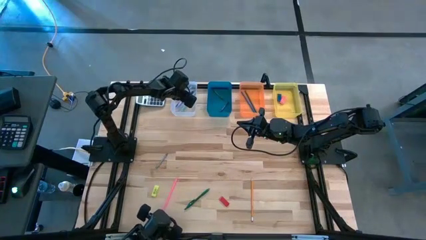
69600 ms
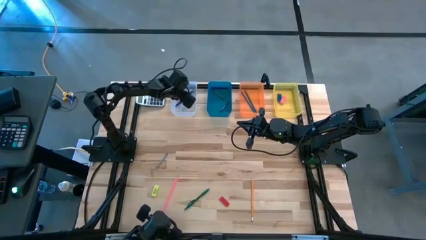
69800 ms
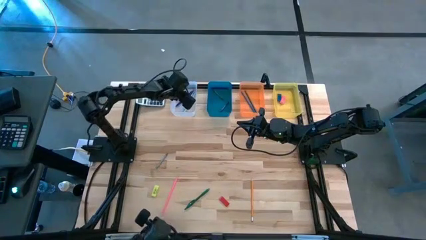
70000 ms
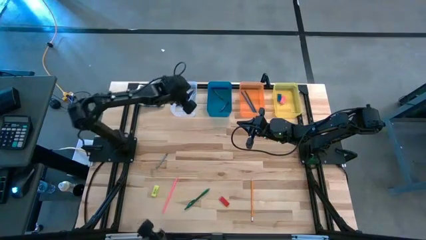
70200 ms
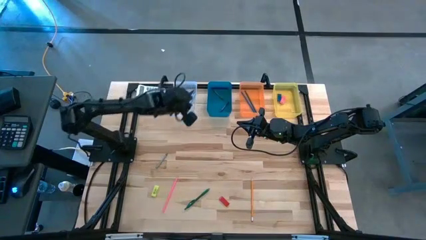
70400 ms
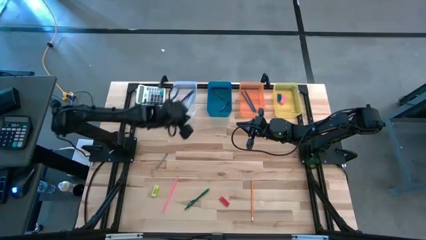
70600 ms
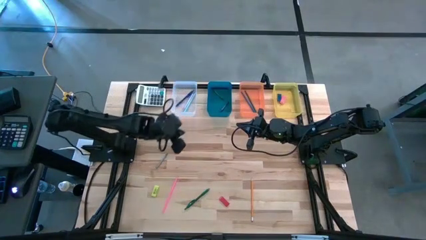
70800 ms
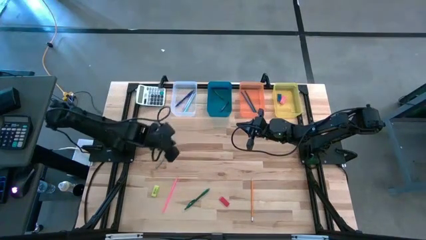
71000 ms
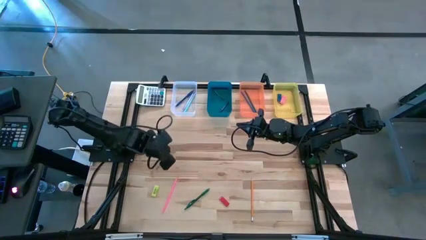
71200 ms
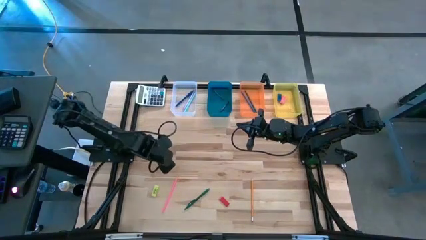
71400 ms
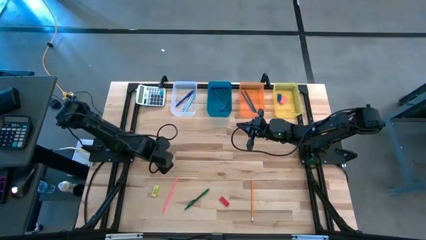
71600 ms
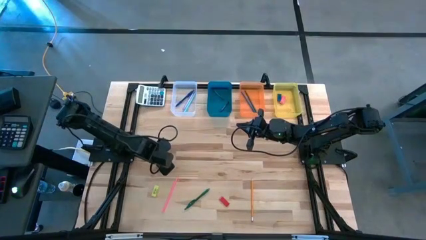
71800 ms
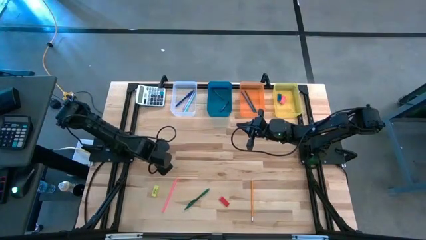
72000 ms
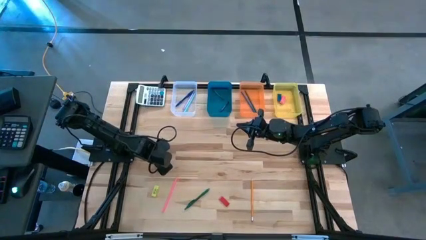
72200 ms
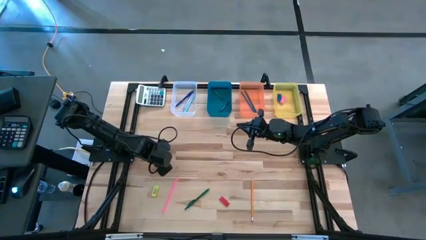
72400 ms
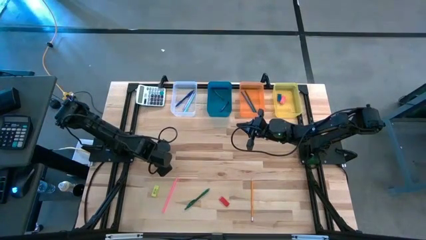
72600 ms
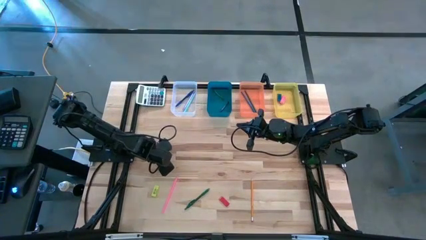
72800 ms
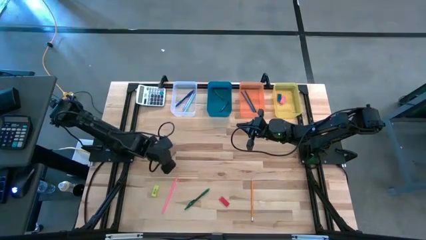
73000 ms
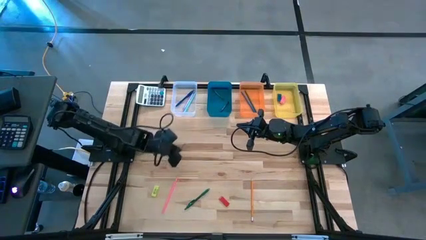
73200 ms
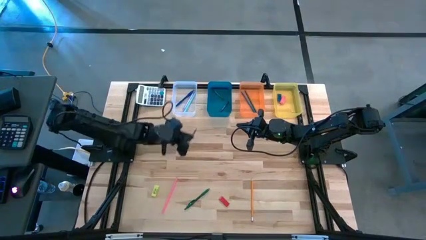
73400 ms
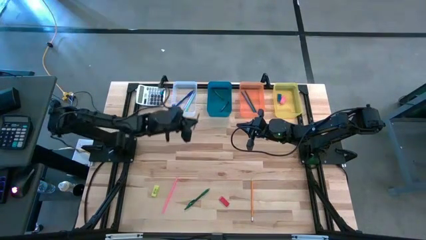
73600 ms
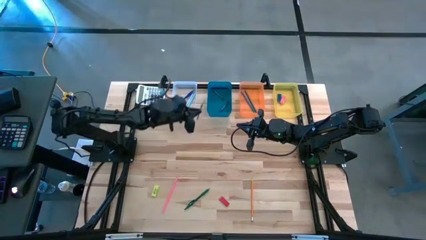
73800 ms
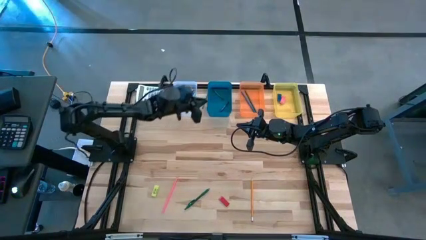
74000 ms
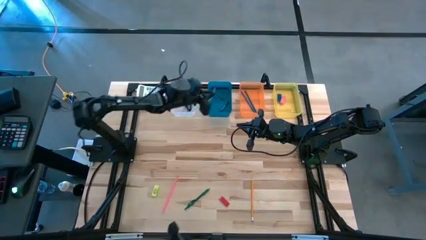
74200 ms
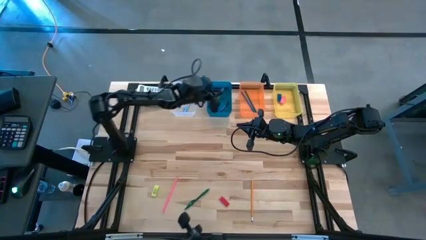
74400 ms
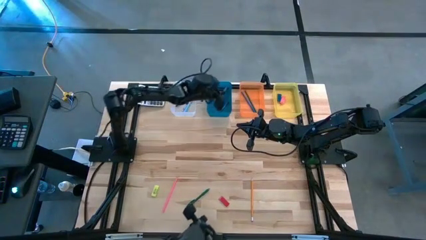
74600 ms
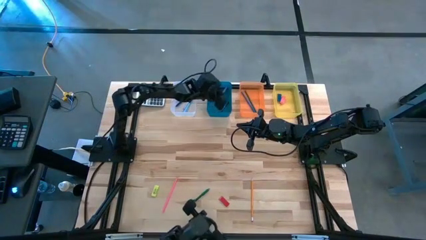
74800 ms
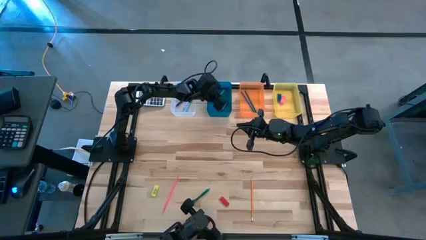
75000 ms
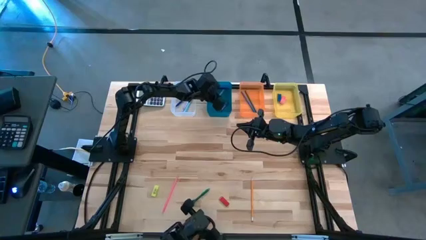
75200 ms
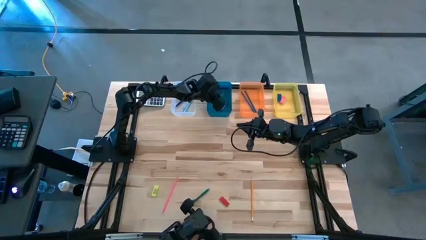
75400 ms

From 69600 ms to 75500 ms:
Task: Sort crayons/erasers/pens/pencils in bins
Put the gray crayon into the blue bin

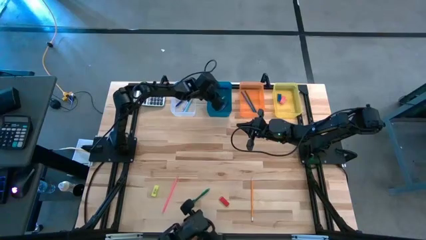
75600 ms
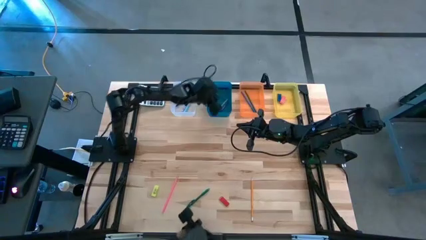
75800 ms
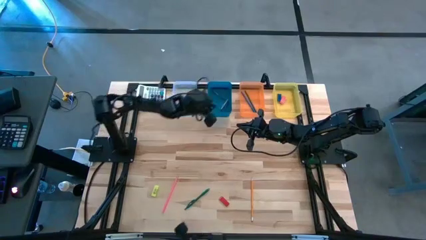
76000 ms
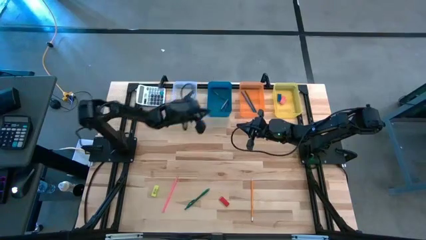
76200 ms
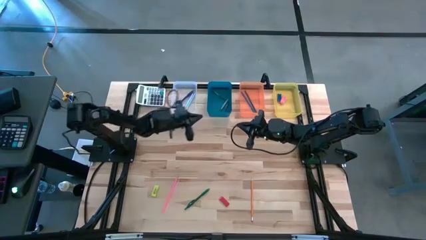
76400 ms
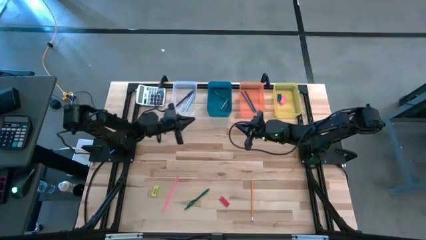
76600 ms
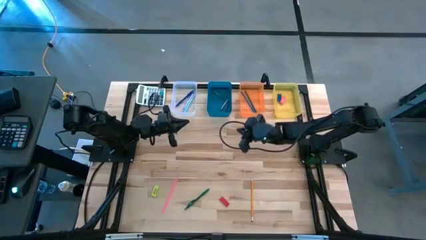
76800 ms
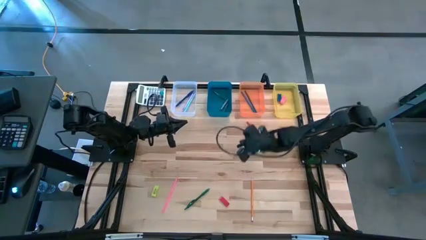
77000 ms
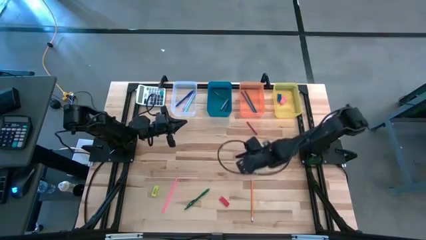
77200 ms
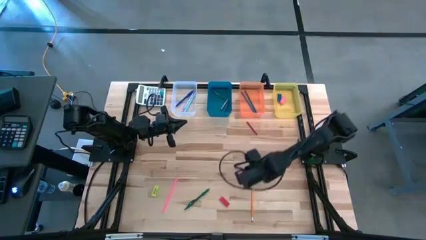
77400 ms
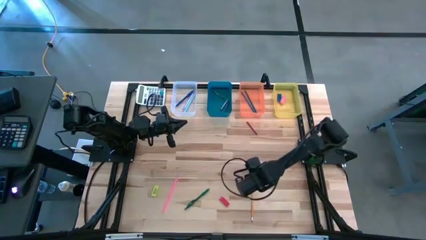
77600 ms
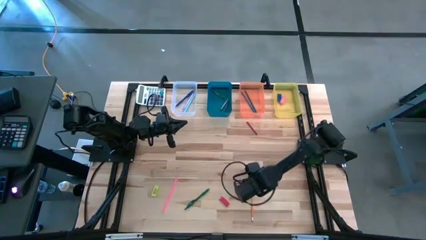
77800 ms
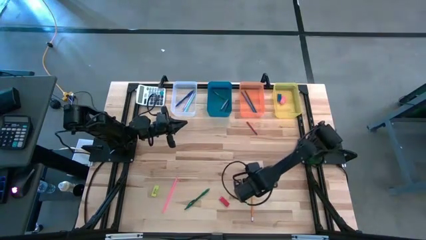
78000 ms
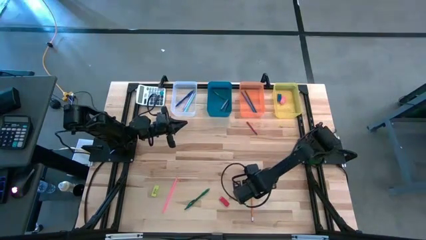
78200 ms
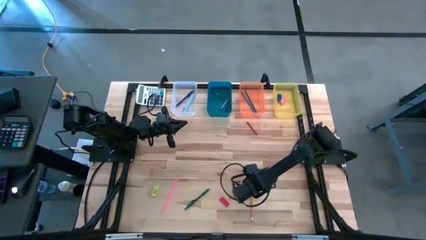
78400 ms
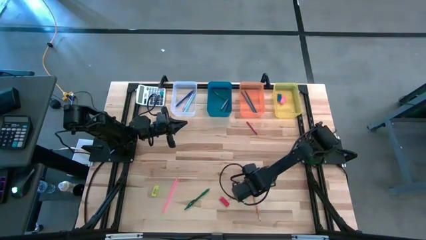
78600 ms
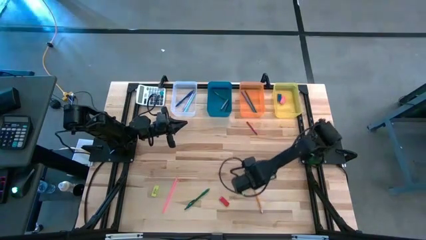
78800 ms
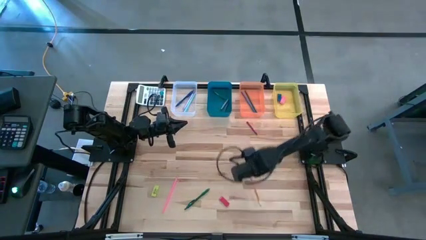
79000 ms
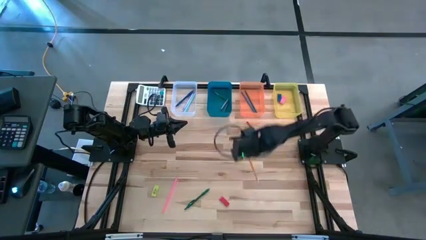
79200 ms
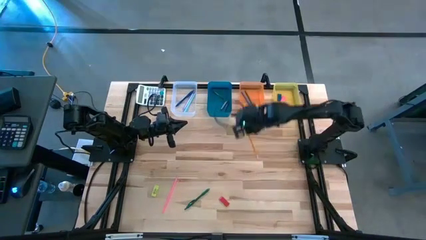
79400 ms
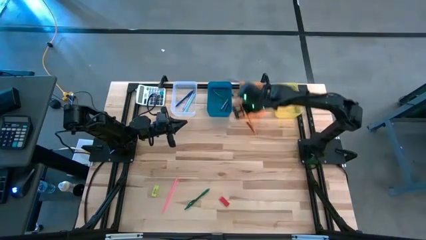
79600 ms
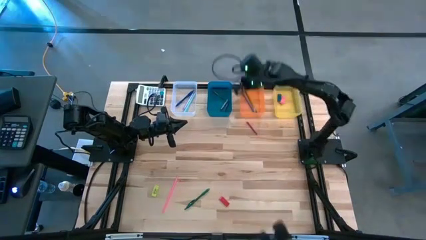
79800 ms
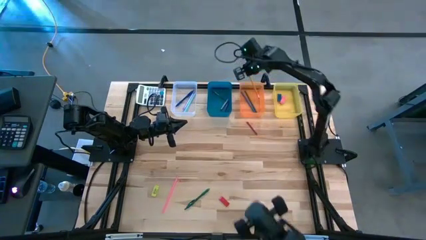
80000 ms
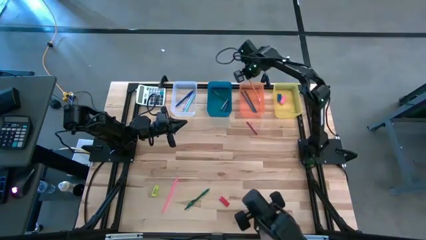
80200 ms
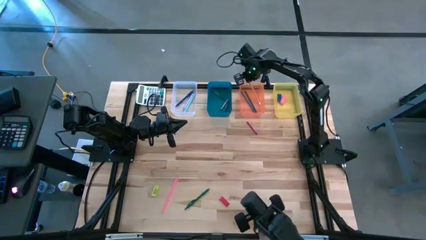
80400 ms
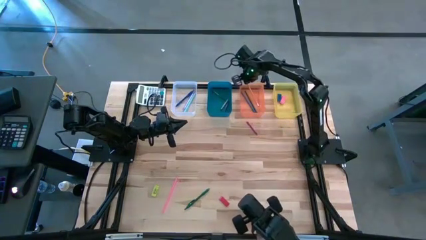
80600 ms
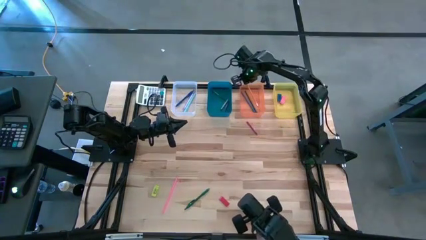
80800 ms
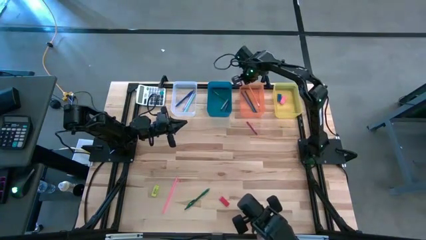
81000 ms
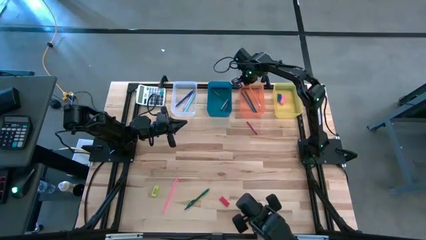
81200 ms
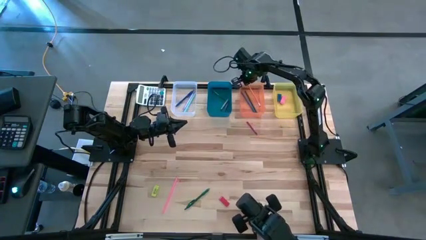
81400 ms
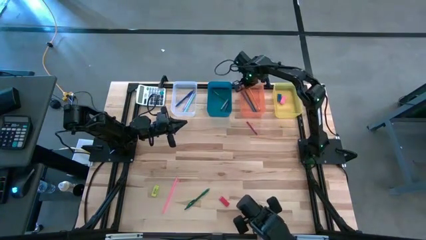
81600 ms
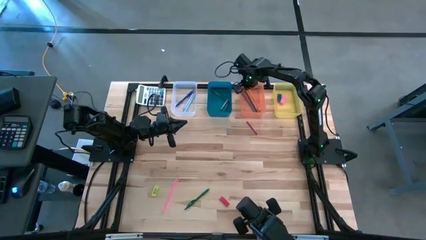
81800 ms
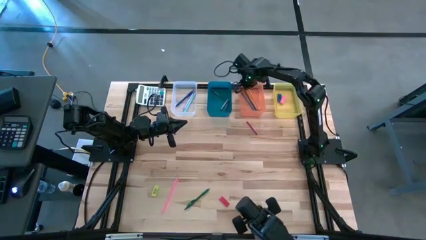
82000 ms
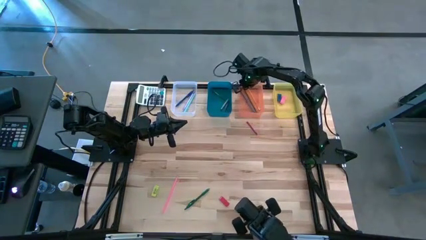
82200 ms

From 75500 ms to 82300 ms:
Put the orange pencil into the orange bin

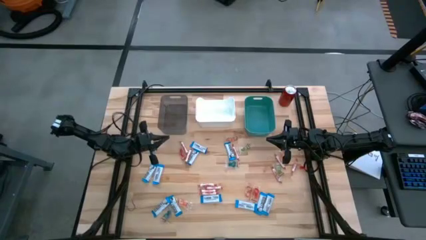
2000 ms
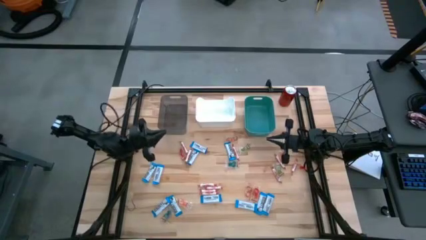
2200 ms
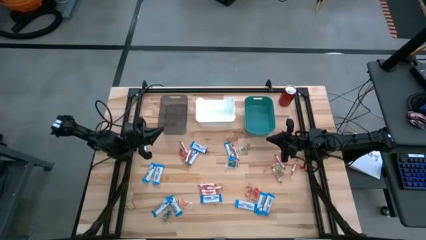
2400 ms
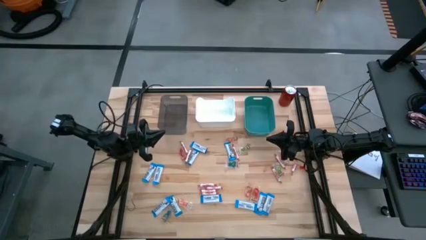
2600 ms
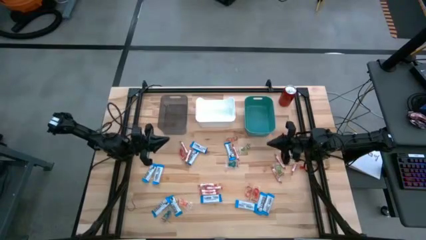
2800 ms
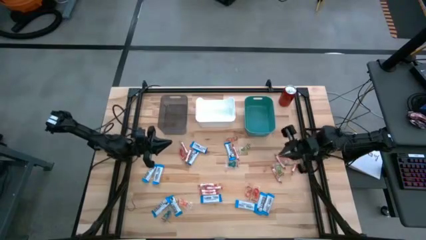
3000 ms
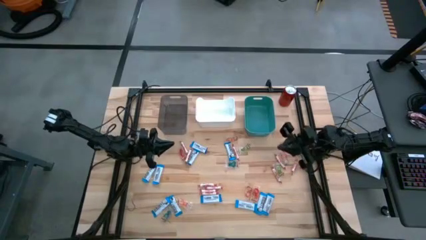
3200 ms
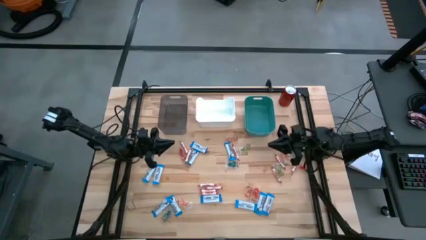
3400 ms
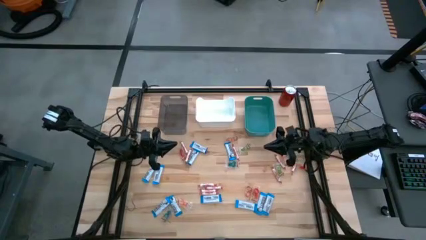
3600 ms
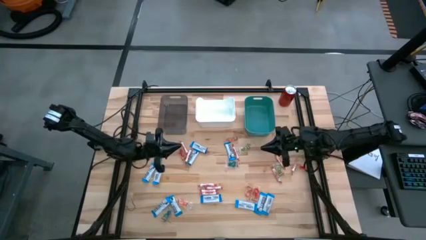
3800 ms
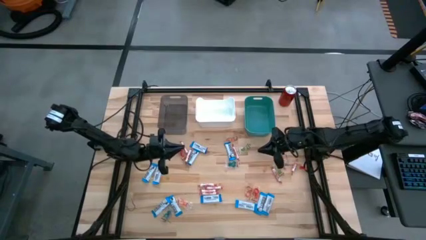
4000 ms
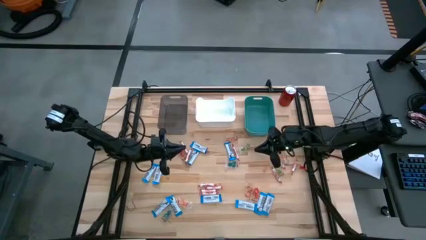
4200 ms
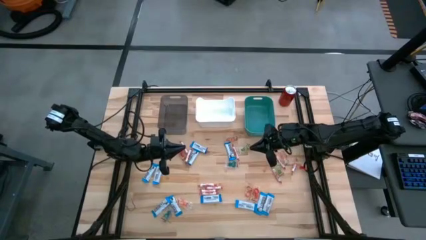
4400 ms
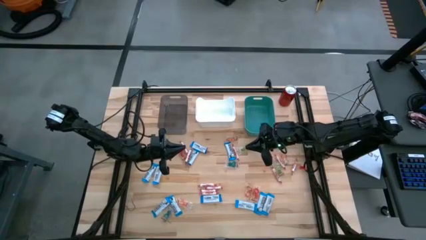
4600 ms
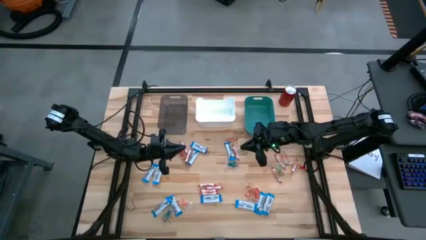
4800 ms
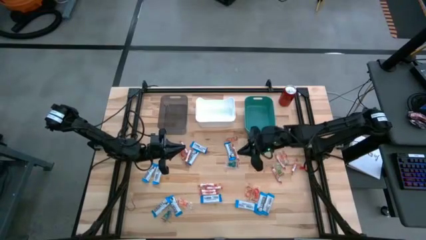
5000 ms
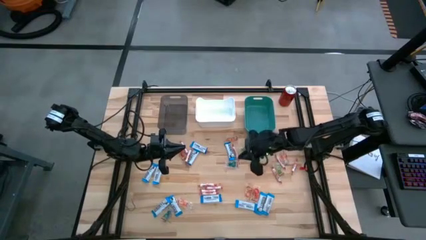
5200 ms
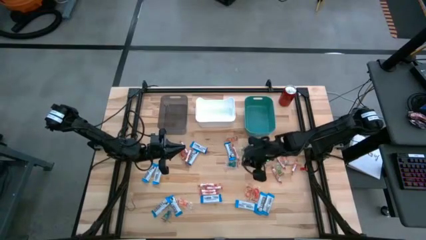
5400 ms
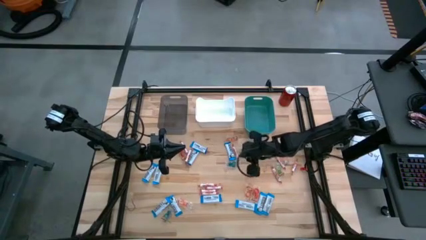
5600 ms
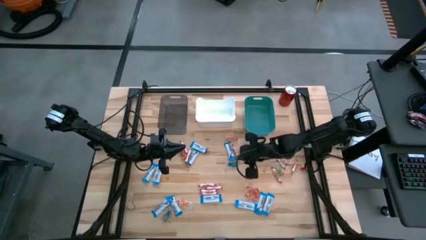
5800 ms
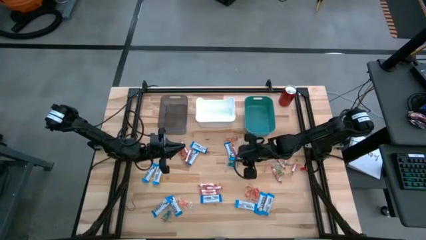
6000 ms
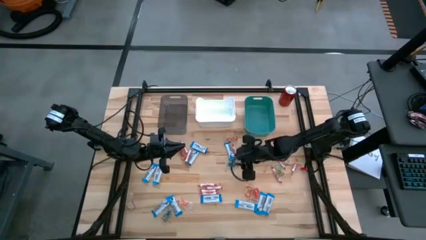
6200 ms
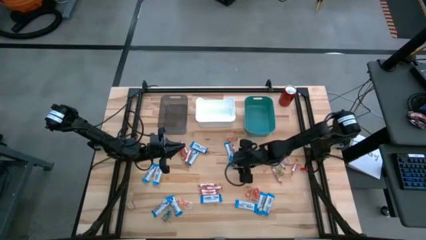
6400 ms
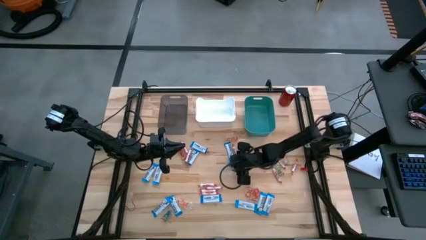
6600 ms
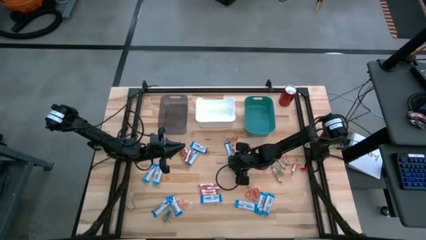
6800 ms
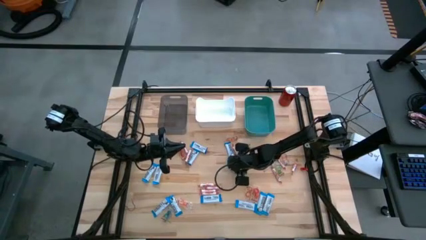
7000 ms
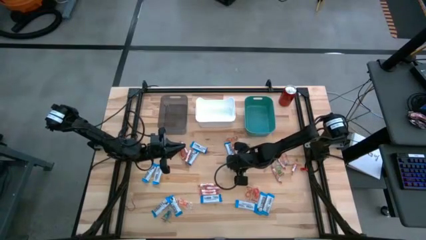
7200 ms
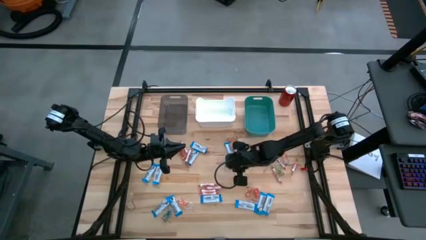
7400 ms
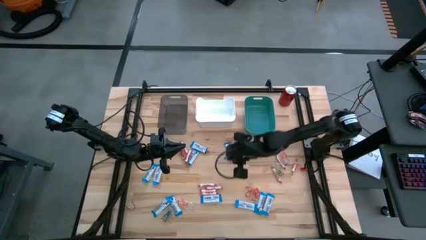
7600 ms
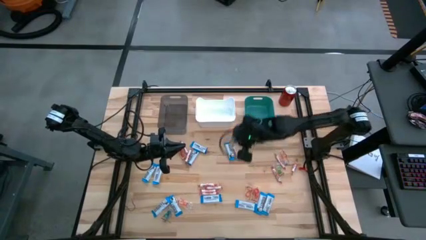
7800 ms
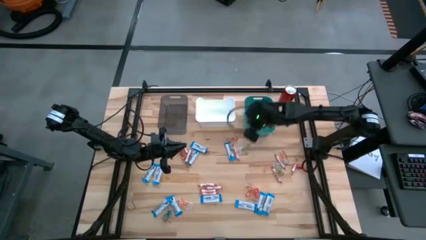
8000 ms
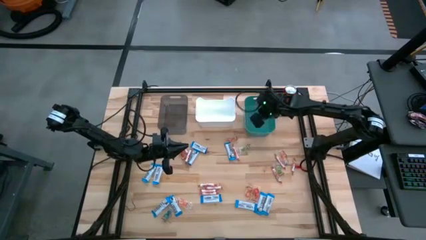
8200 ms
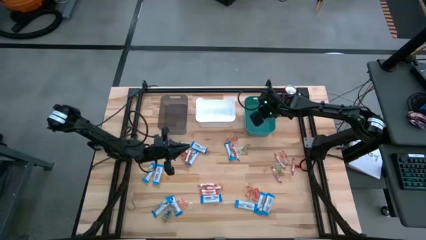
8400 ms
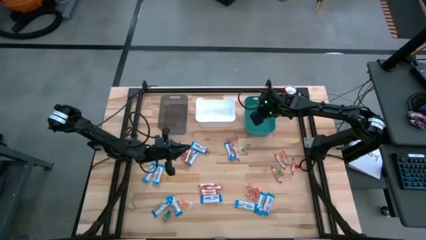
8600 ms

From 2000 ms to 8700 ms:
Task: Sort candy
Put the transparent candy into the green bin
